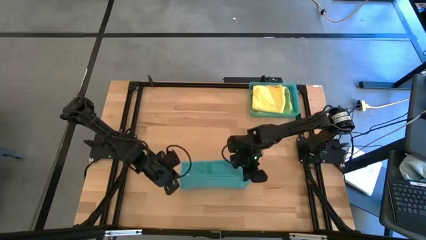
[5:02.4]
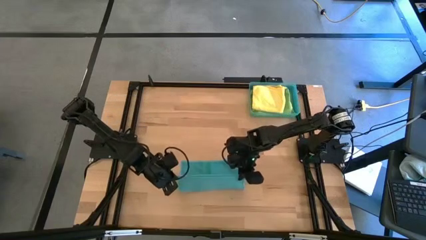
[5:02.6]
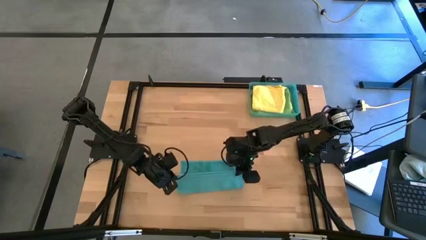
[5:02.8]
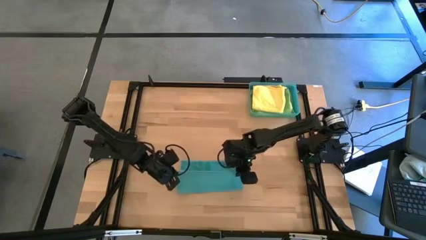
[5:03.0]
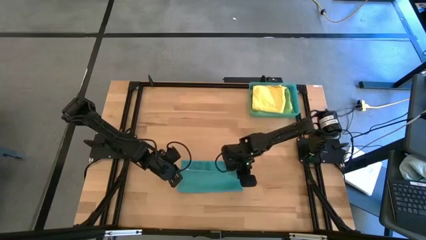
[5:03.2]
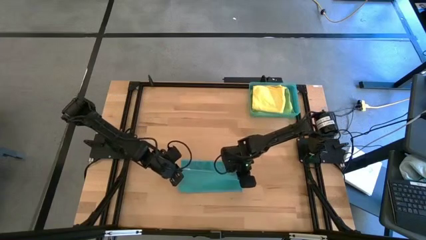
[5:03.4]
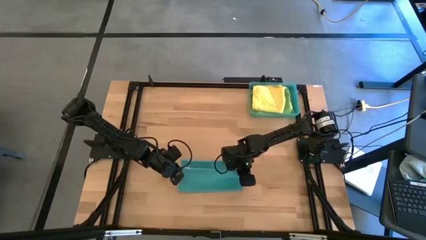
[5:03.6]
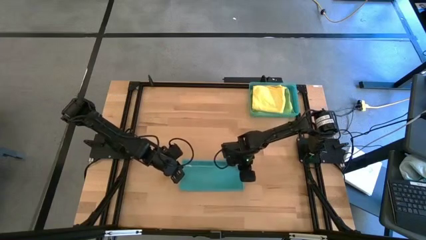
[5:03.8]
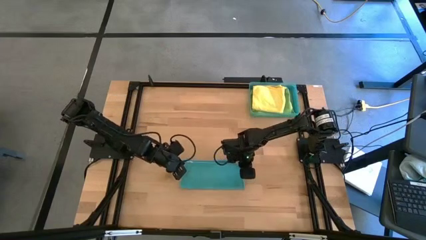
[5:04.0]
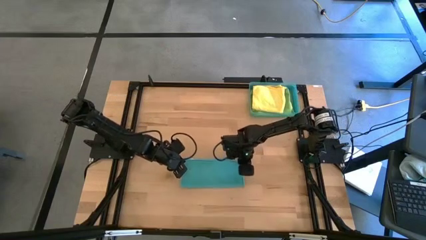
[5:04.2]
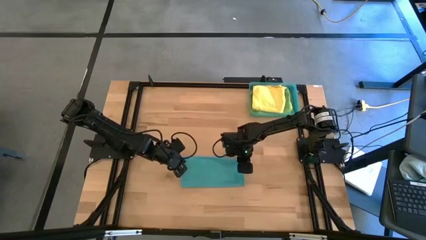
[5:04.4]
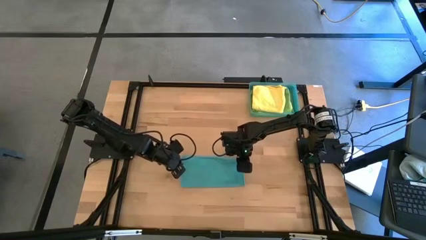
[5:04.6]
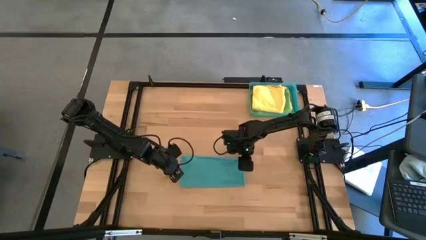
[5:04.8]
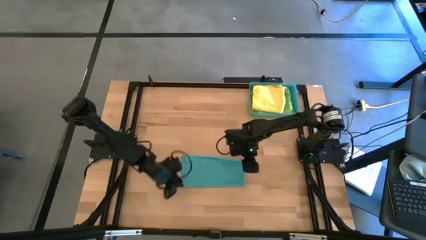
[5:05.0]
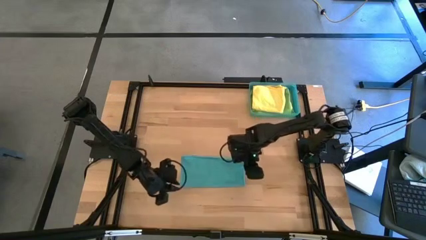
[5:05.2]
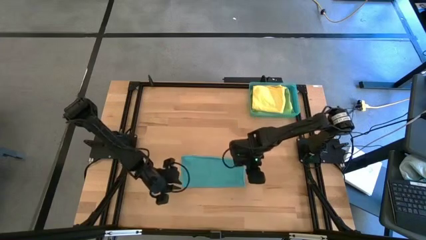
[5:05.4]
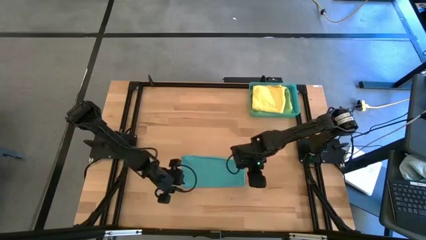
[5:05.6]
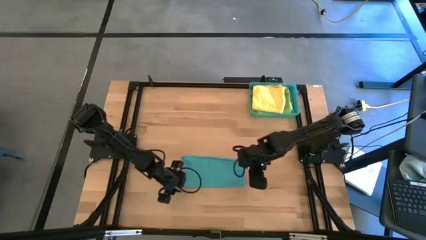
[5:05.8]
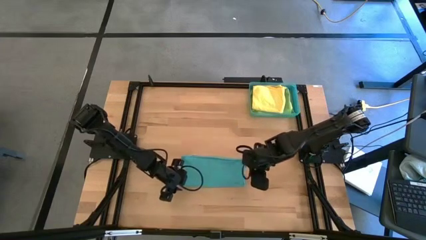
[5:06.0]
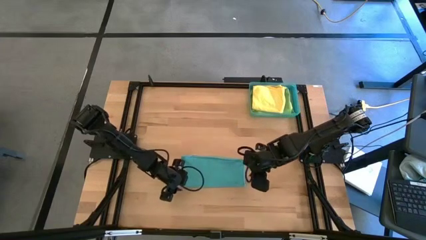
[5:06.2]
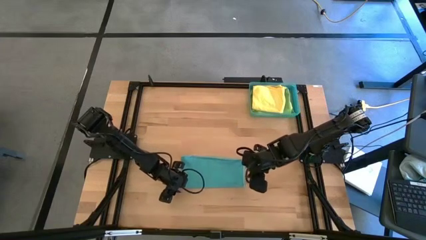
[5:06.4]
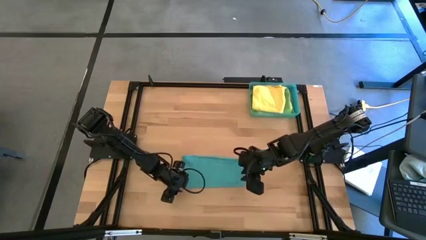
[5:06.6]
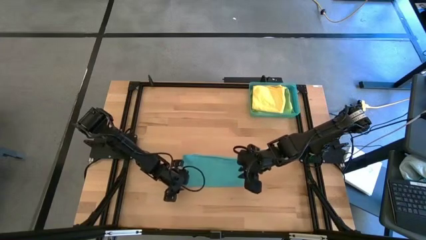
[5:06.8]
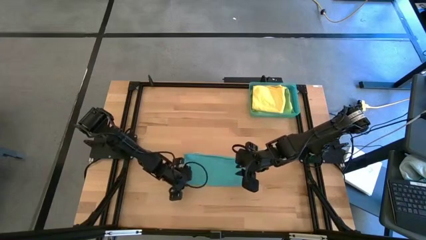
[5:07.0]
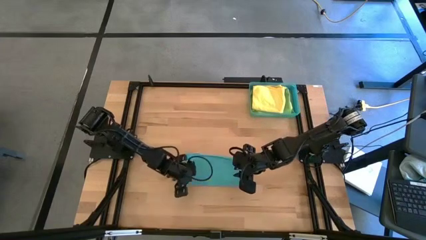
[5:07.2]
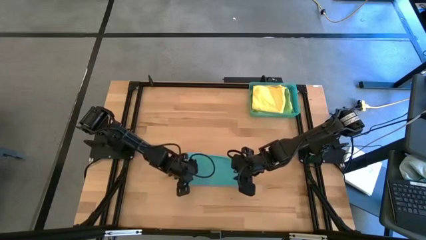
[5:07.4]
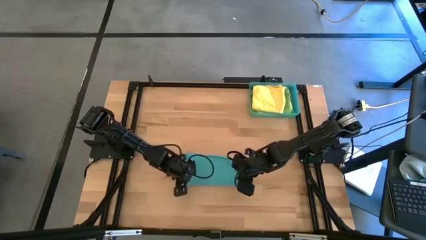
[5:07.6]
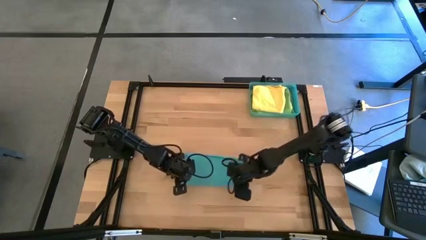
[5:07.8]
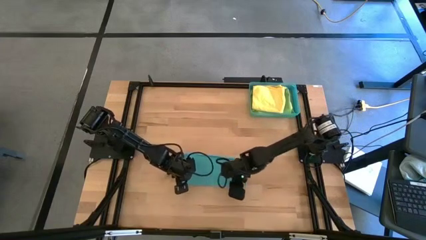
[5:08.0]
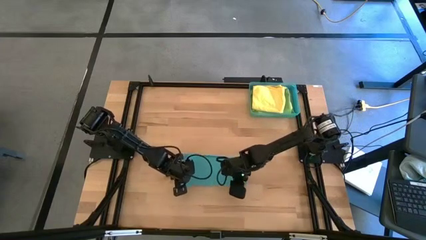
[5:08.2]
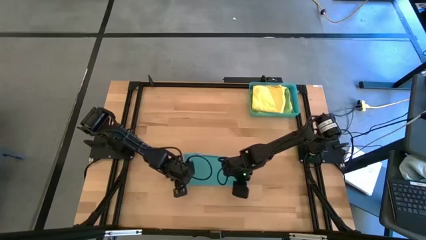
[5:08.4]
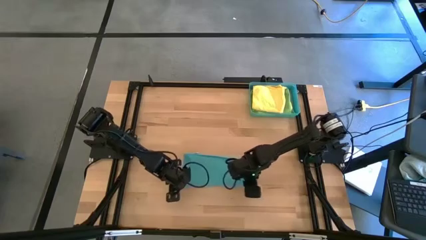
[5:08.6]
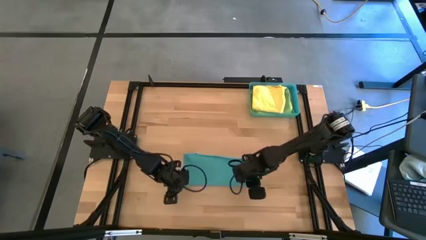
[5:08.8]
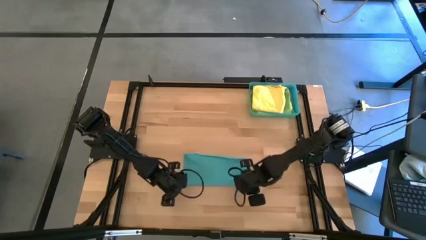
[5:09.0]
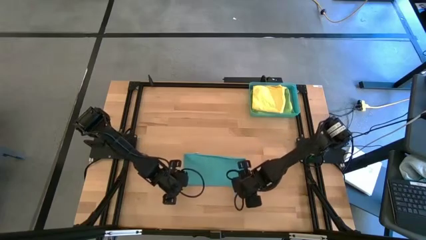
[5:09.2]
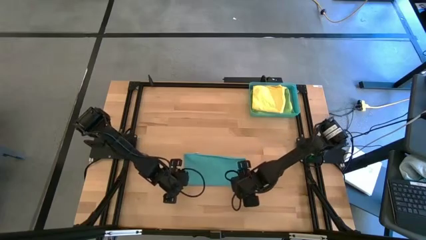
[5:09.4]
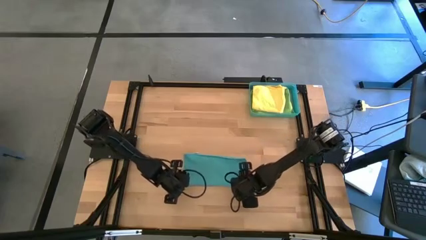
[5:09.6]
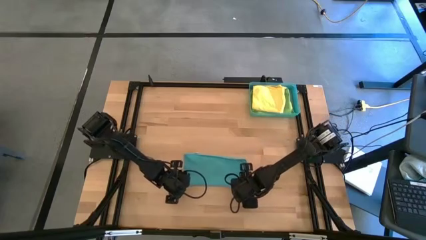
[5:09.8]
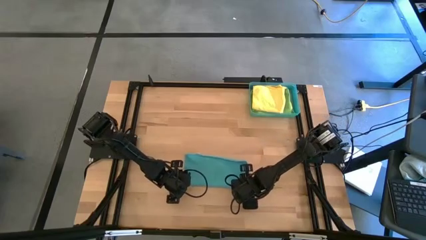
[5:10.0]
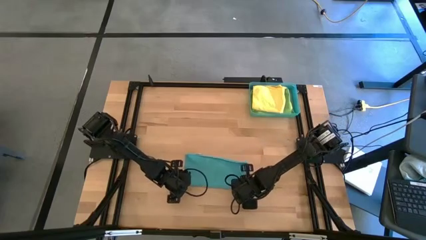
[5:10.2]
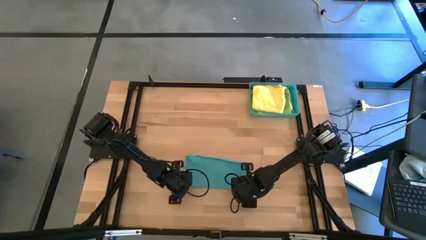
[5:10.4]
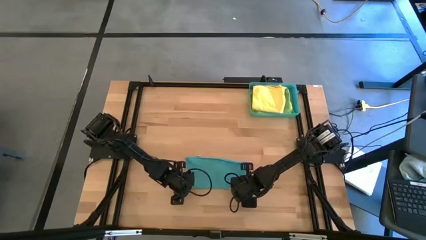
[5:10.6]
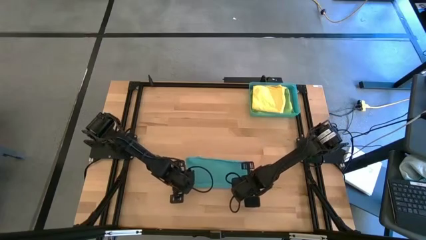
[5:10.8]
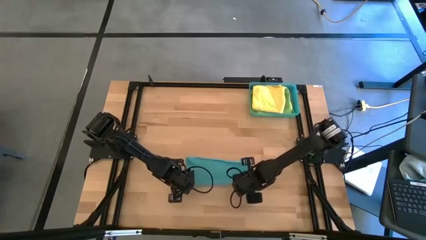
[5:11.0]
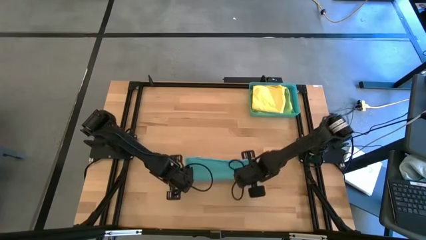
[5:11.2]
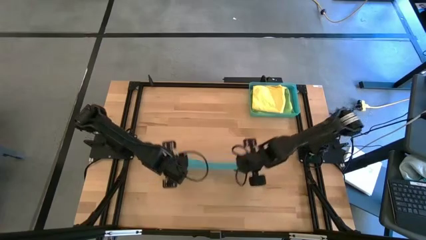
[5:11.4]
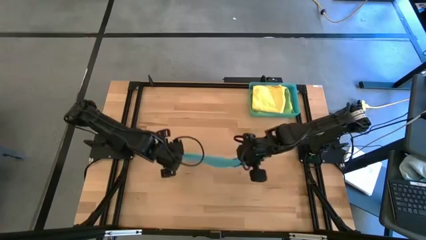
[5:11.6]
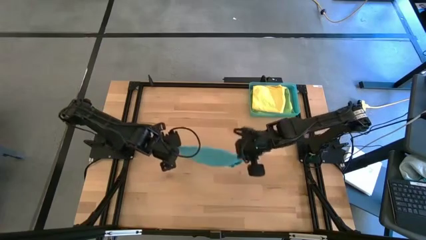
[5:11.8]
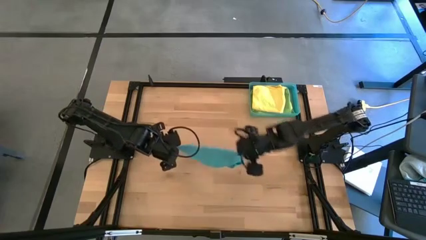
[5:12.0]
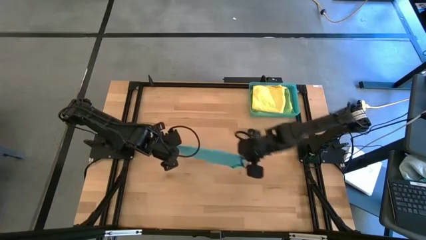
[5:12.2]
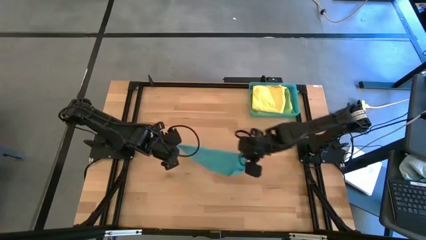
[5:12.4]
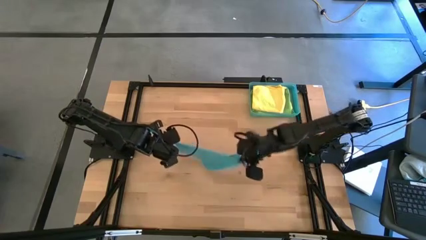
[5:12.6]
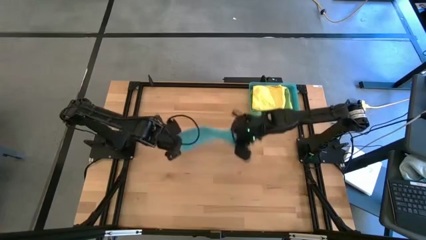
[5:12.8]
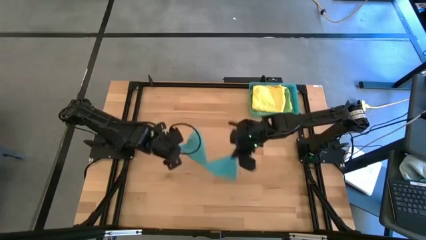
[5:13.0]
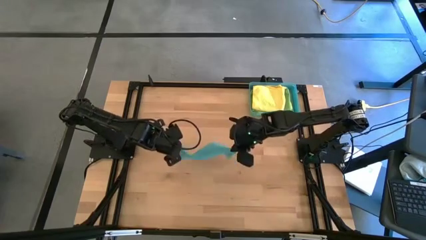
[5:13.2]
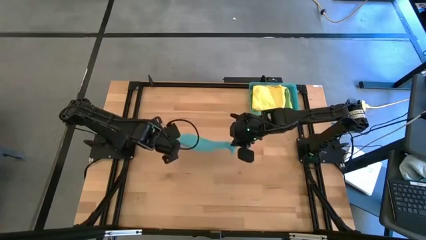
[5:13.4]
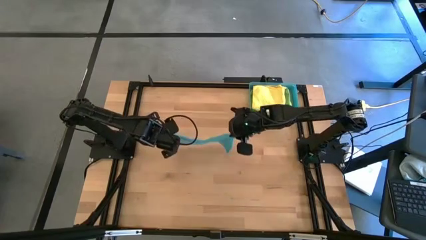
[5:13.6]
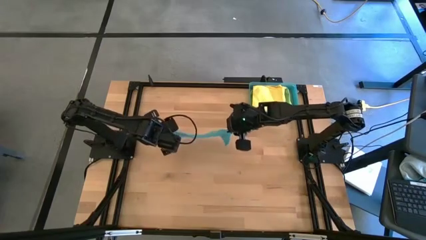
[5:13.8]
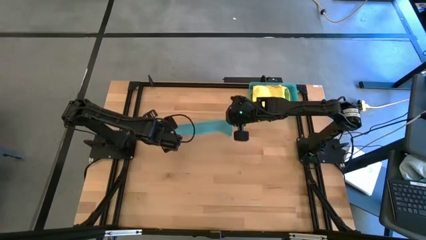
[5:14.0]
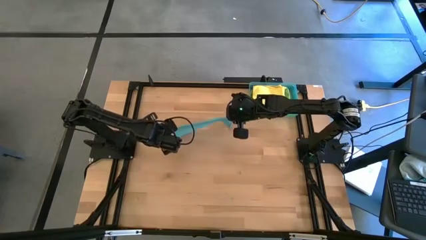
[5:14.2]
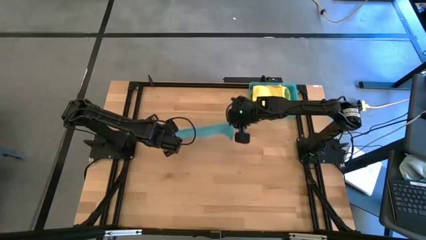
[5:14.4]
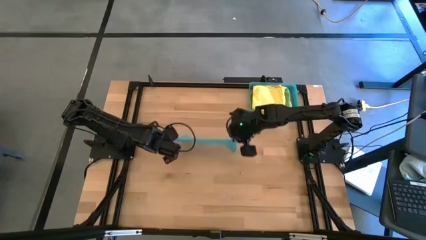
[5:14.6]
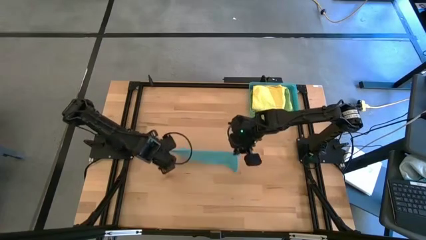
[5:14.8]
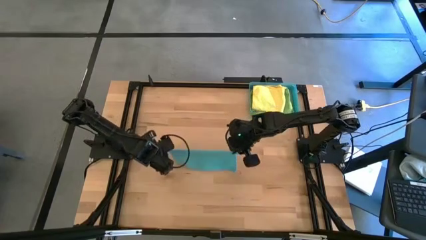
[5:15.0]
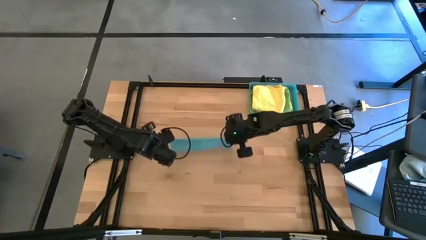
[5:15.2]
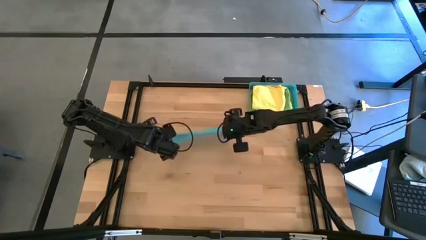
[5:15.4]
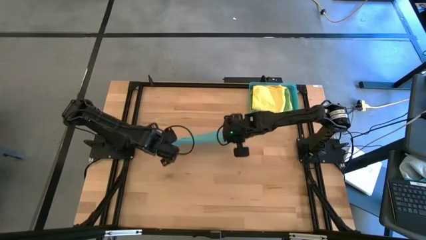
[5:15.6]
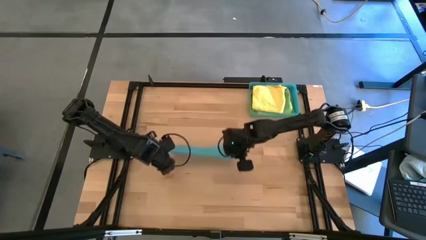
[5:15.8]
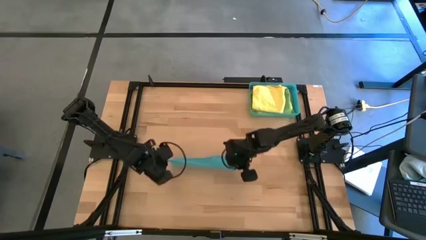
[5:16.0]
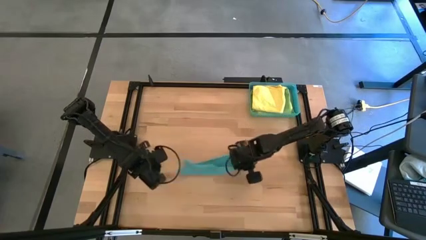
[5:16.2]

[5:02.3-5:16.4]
Task: Fold microfiber towels
Fold the blue microfiber cloth
